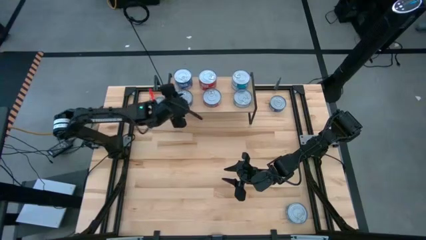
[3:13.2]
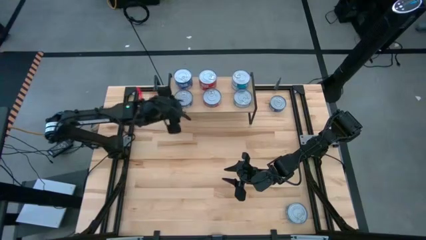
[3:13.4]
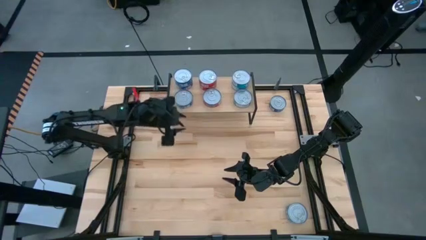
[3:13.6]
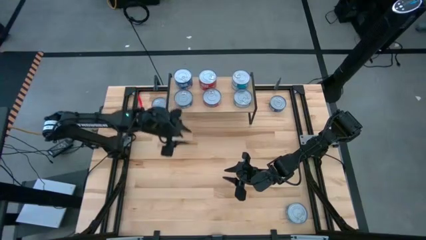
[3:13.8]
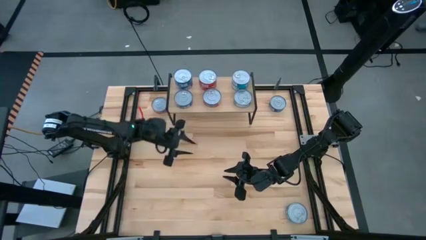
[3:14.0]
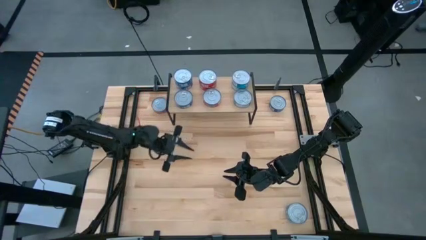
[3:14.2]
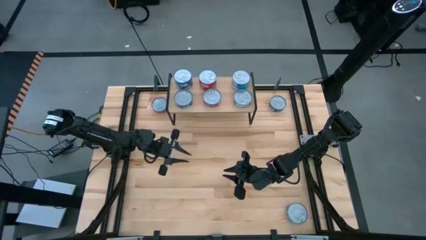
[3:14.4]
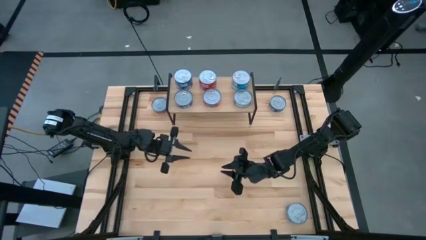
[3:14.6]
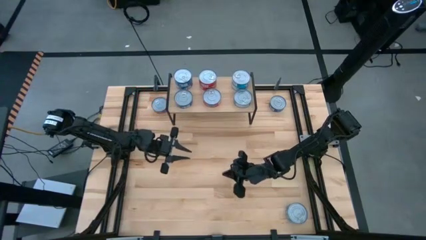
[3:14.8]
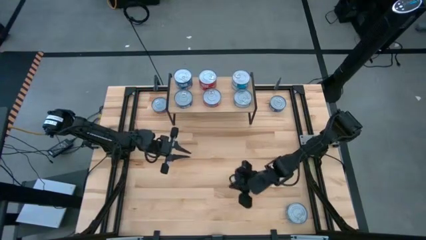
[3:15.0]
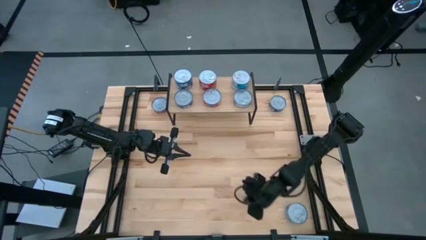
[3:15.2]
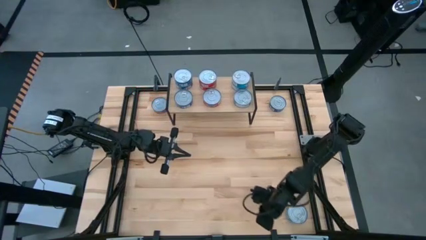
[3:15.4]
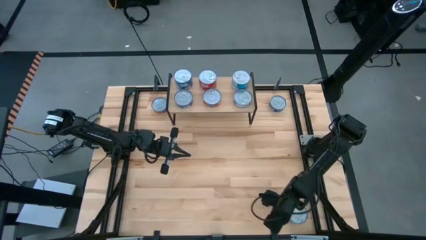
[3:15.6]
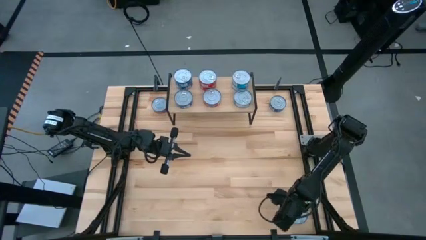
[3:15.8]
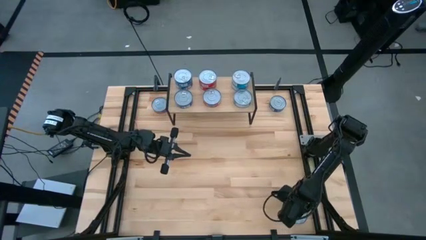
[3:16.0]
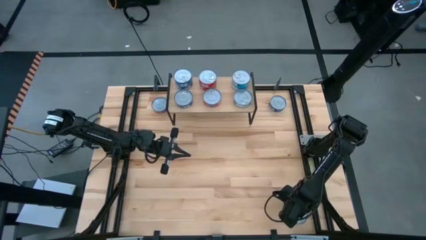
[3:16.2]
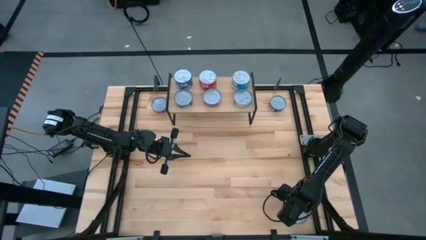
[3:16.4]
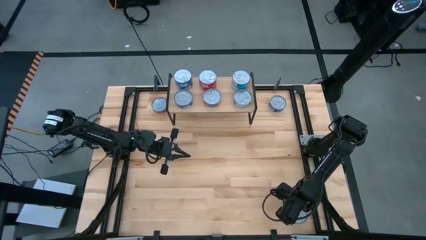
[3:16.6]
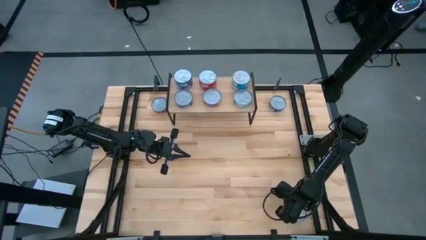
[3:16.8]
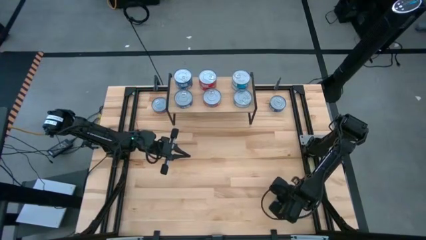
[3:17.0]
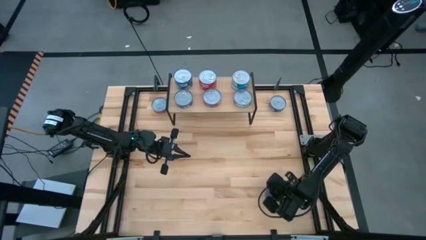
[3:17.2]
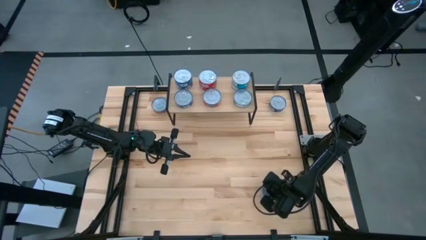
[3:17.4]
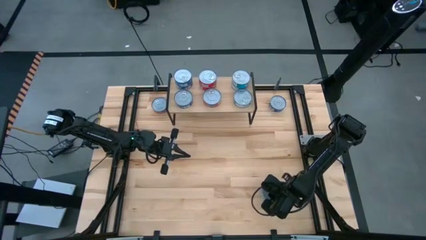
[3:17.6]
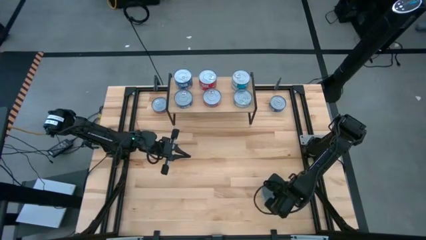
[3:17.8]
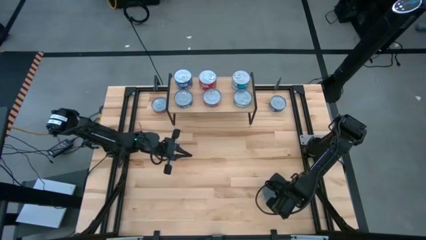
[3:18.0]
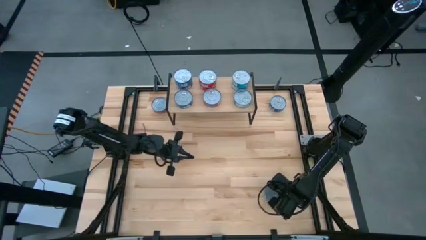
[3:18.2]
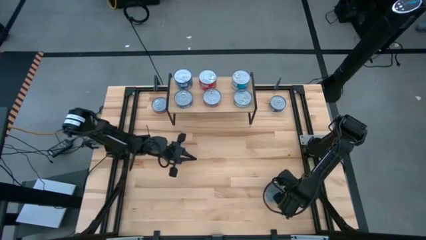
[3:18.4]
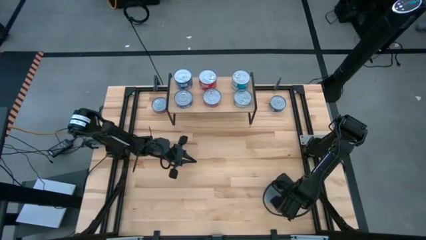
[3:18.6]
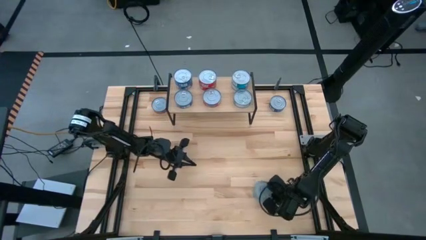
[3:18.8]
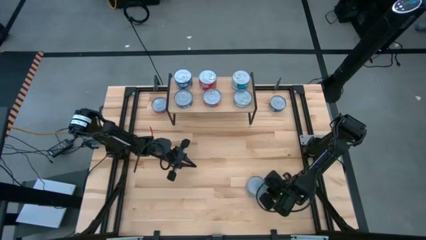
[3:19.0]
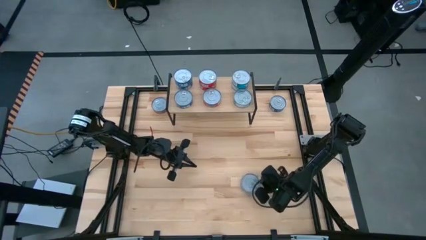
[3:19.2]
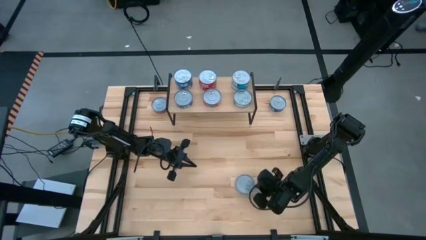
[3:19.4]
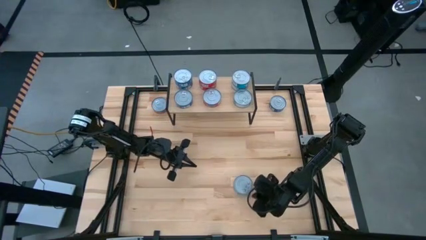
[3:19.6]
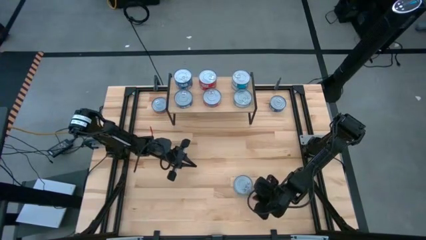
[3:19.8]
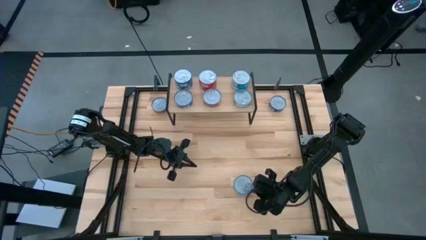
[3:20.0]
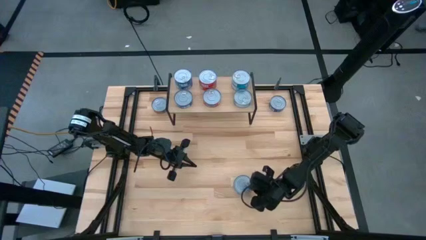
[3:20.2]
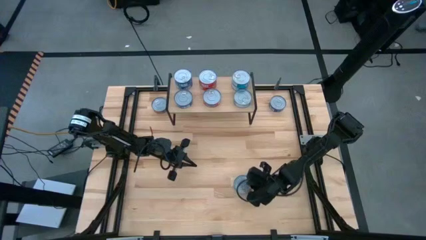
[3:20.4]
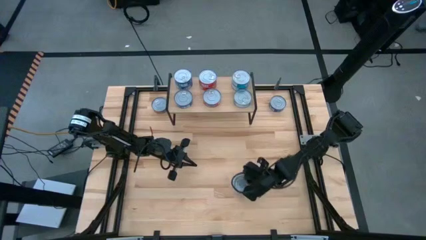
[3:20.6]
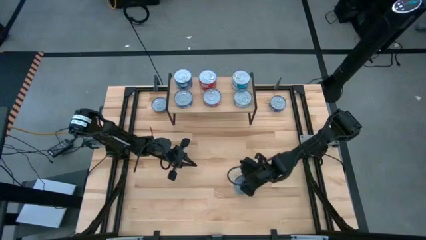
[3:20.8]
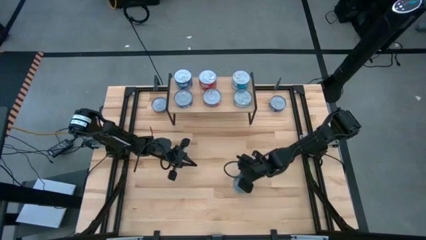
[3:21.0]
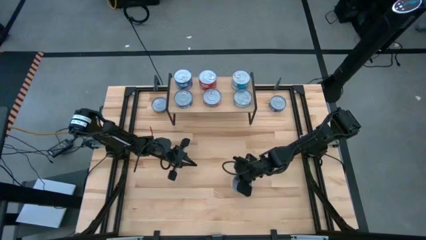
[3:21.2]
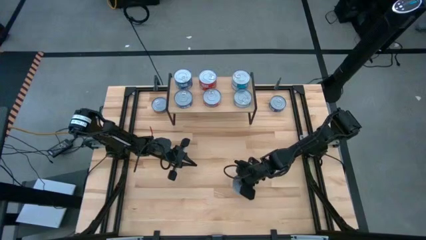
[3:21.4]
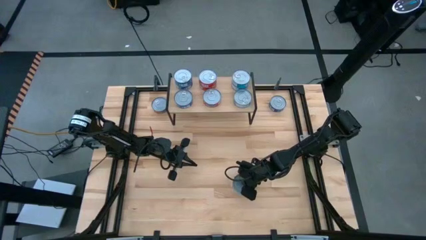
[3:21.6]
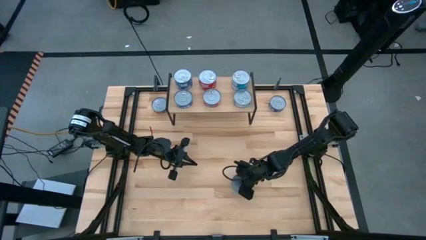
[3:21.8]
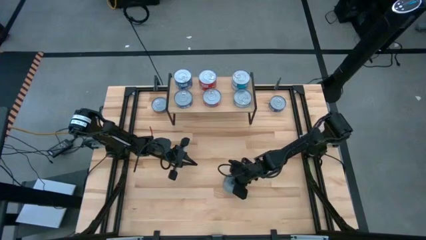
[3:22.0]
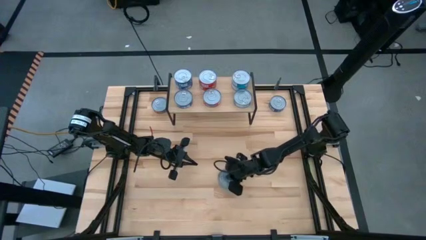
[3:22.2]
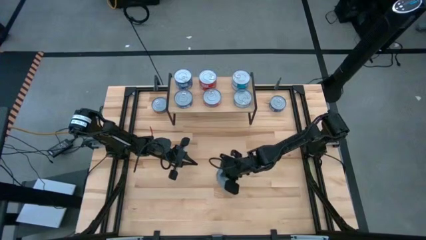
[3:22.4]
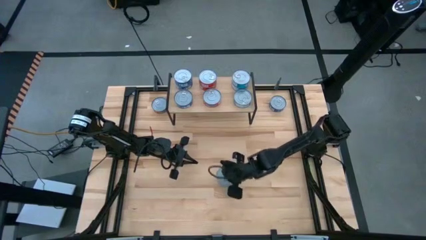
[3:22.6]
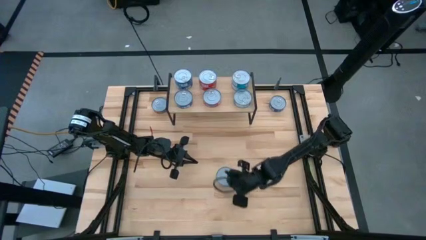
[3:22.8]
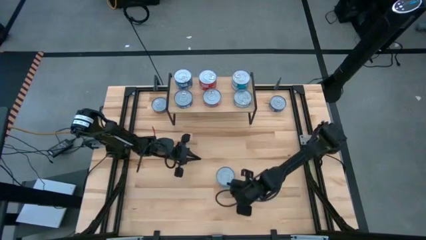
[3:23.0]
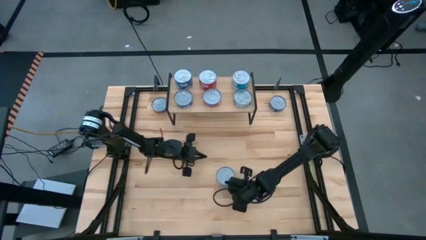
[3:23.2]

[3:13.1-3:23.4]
Task: Stack canned seafood by type on shelf
Stack the yellow blue tuna can on top of the yellow blue tuna can on the shelf
